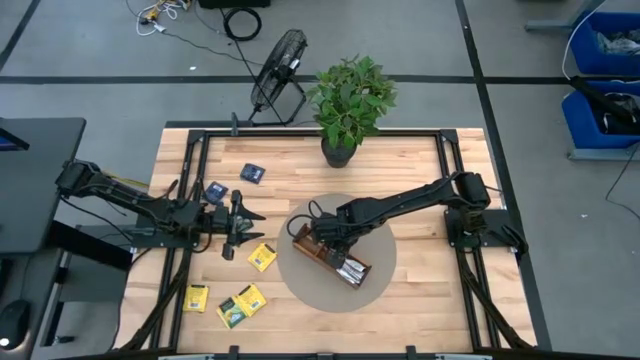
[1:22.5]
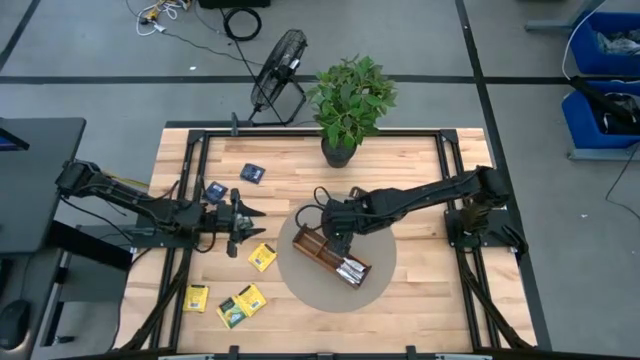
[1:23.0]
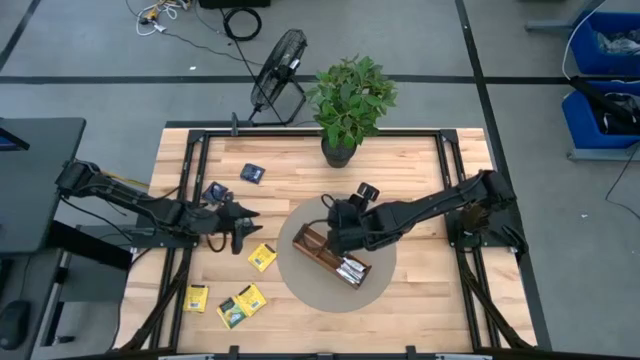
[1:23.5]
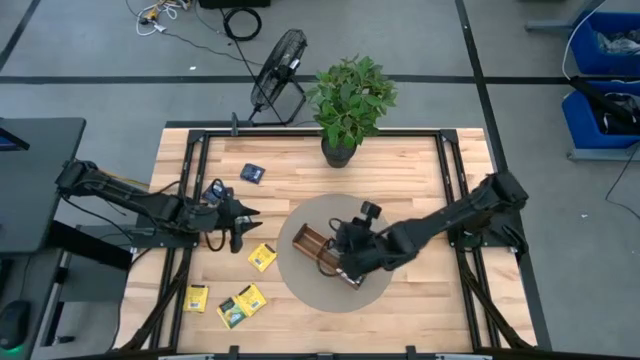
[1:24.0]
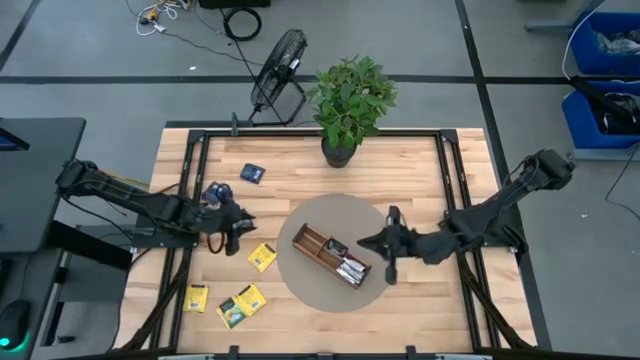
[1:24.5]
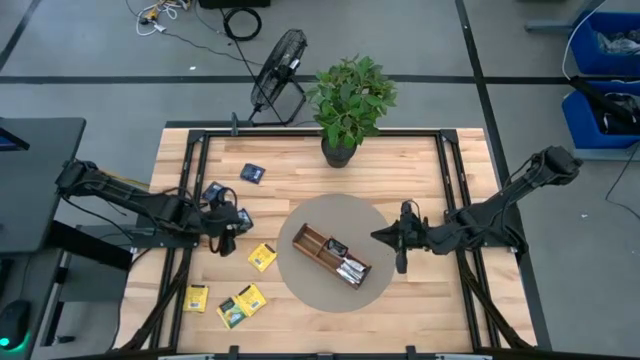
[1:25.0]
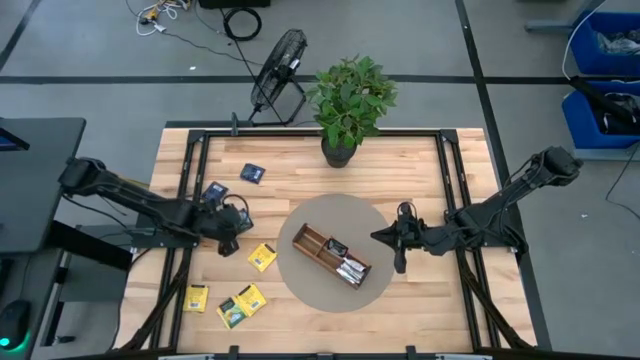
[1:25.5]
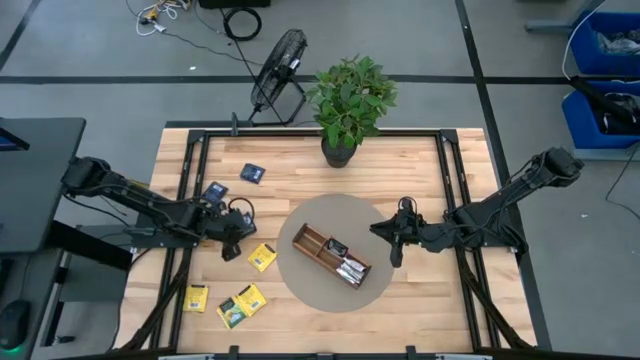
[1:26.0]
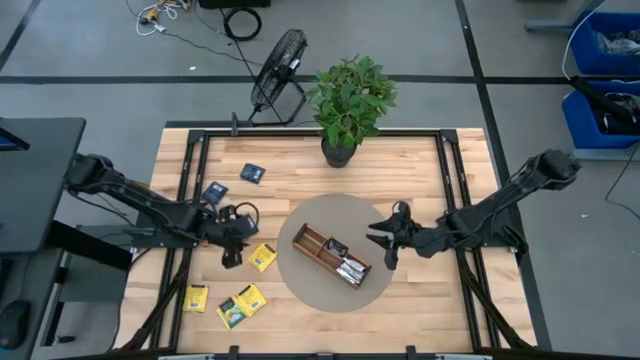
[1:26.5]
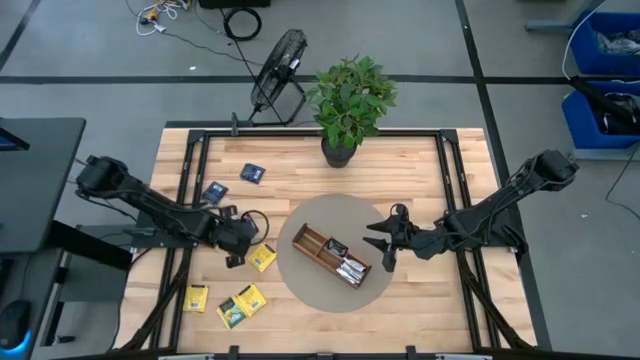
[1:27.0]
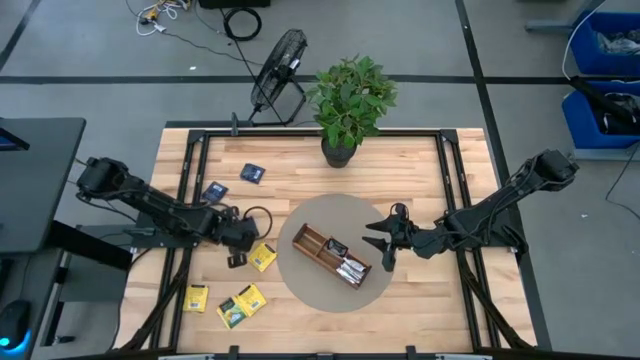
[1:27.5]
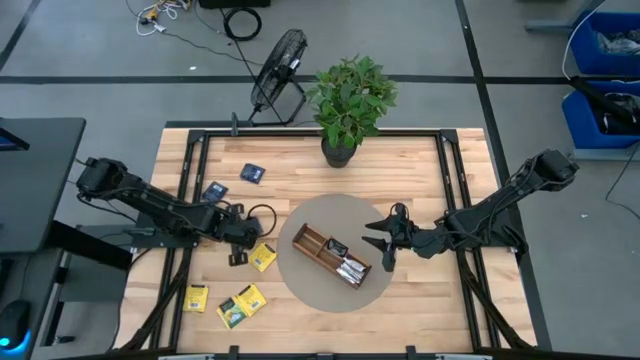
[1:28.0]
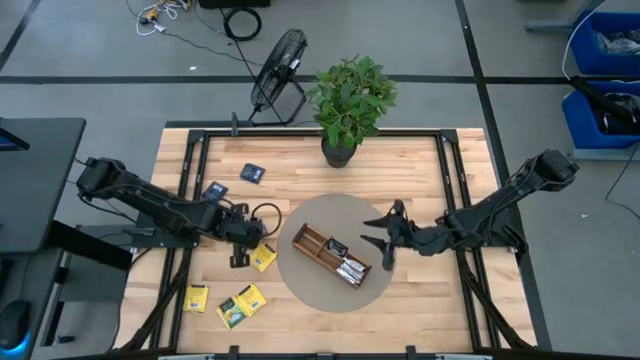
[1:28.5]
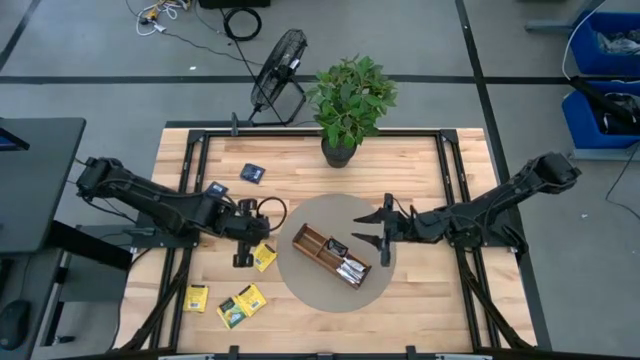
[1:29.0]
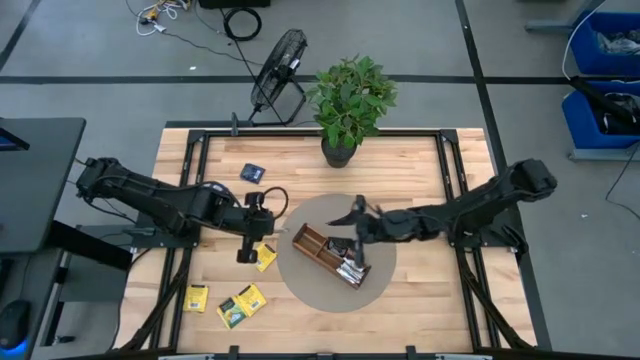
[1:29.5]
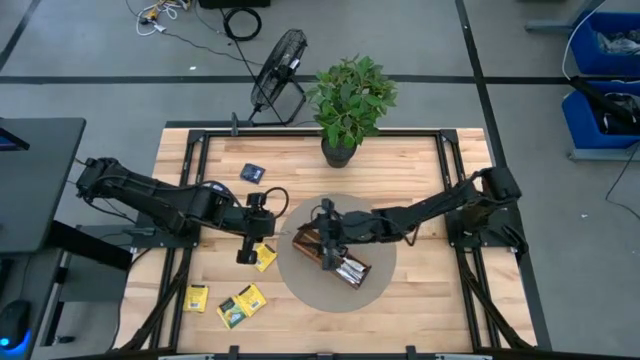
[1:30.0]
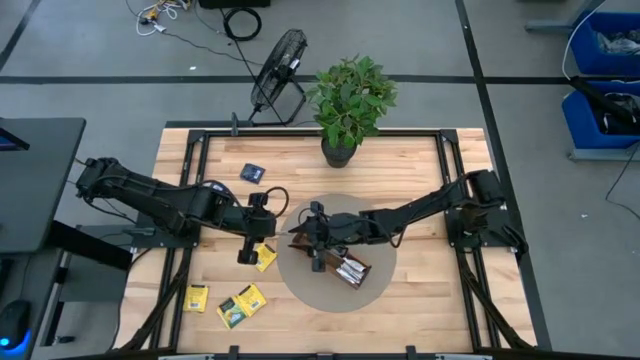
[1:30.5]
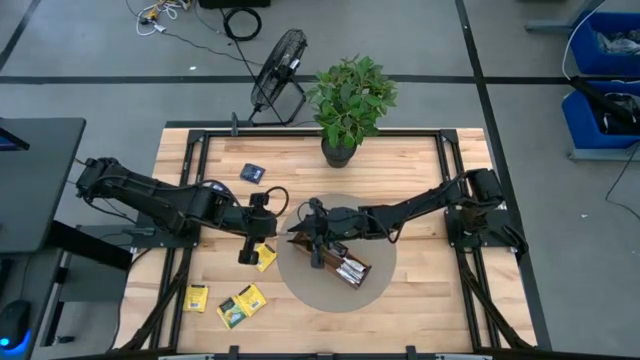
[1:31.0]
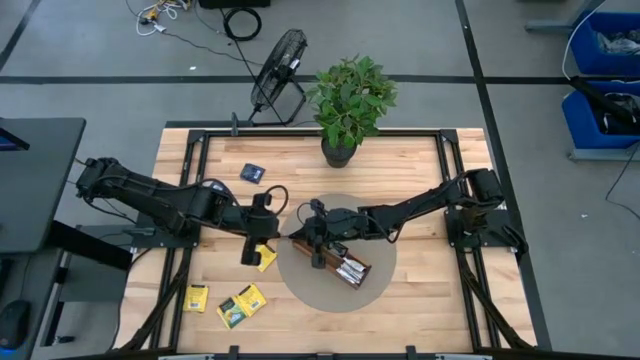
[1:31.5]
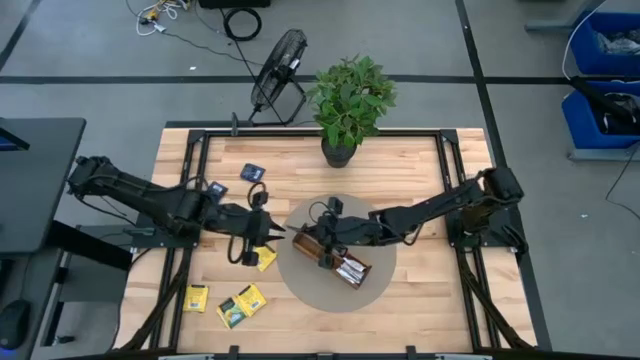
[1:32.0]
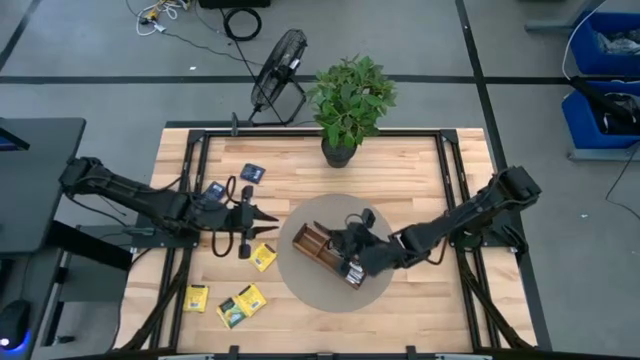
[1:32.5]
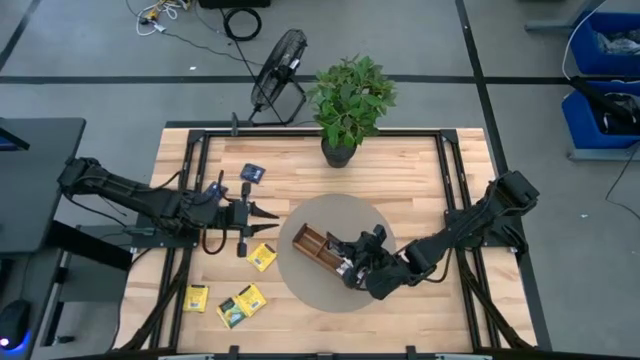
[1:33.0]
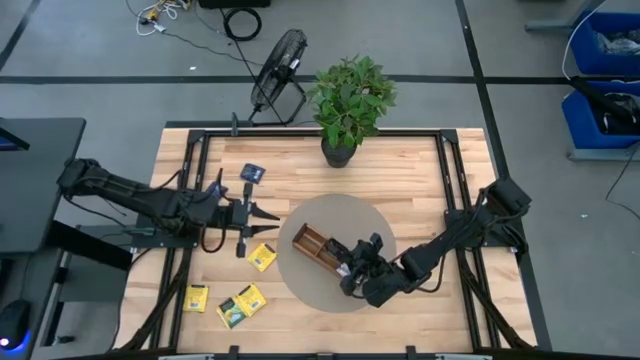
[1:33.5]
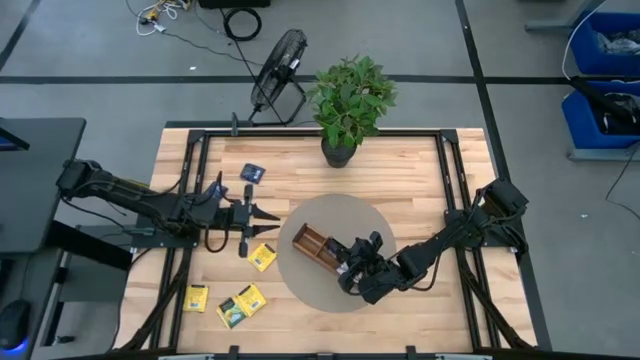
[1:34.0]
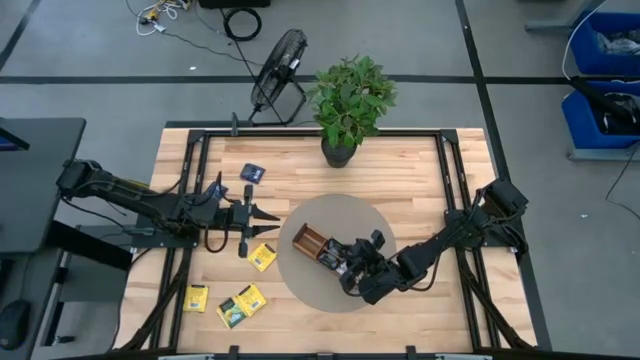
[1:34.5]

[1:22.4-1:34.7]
Task: Pick & Place Tea
Put the purple tea bag into the middle section of the wooden organizer

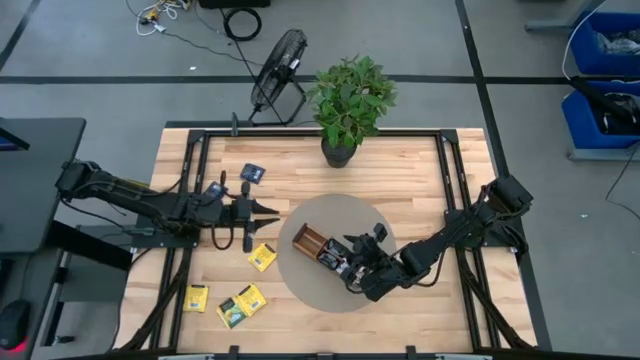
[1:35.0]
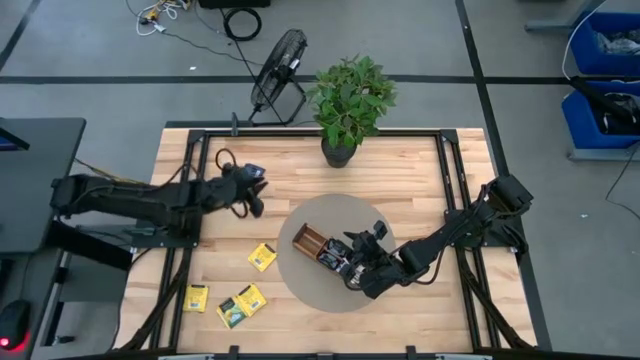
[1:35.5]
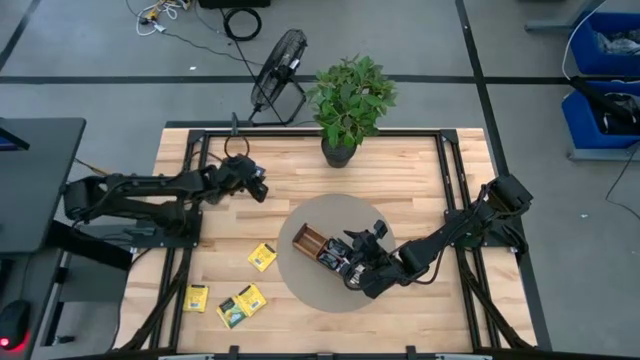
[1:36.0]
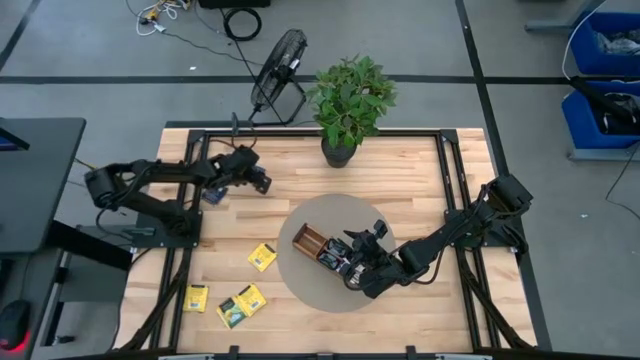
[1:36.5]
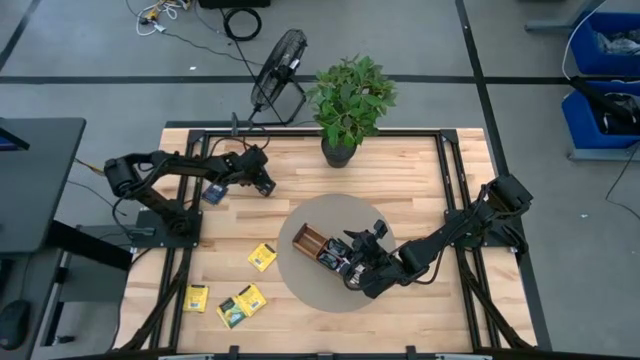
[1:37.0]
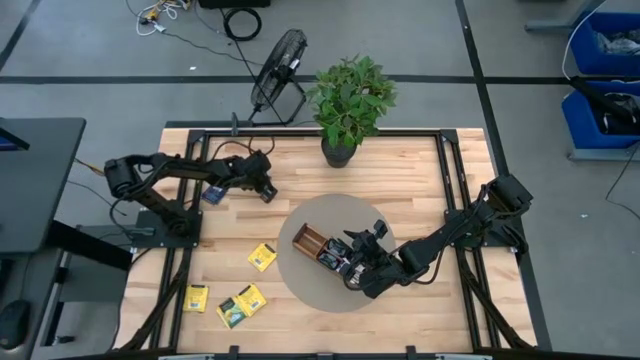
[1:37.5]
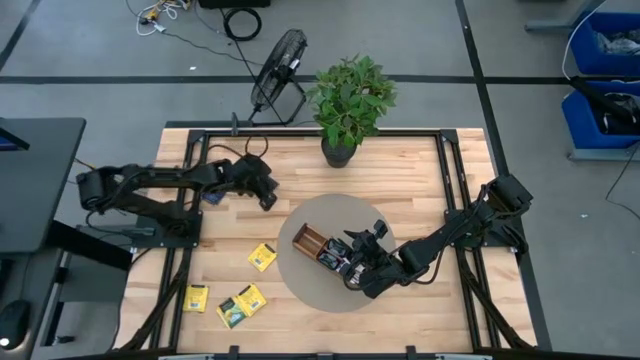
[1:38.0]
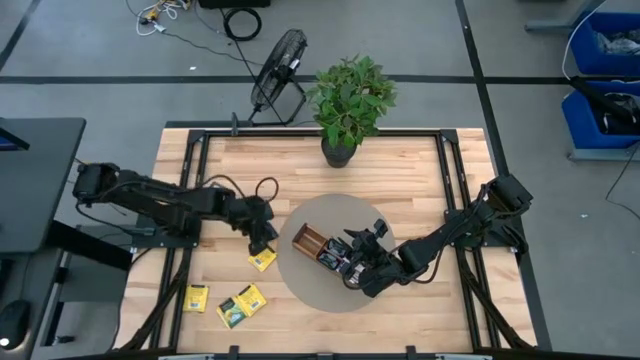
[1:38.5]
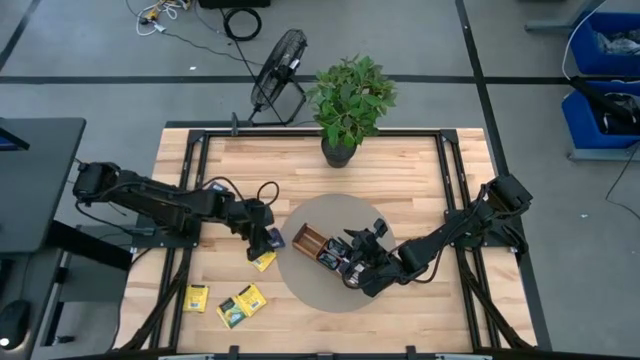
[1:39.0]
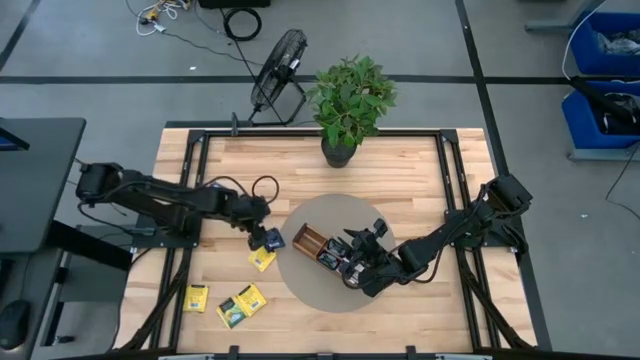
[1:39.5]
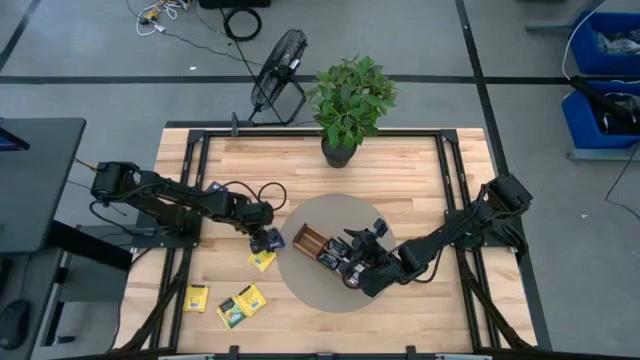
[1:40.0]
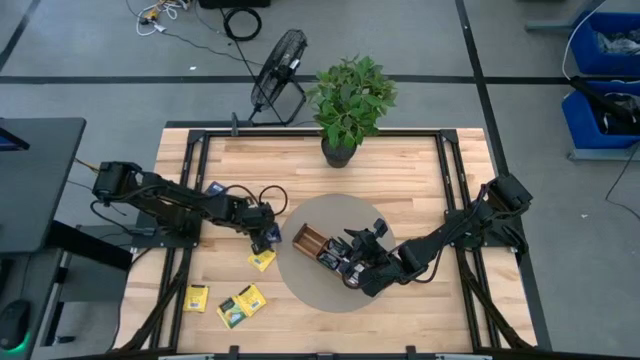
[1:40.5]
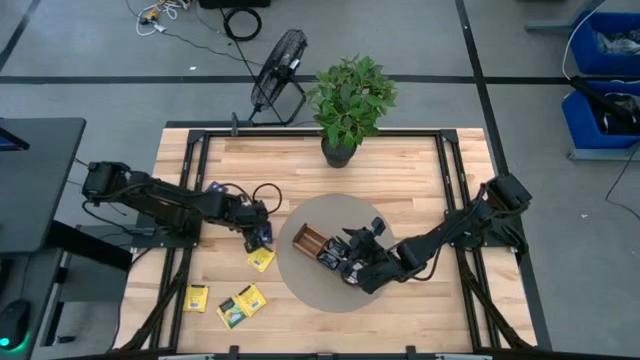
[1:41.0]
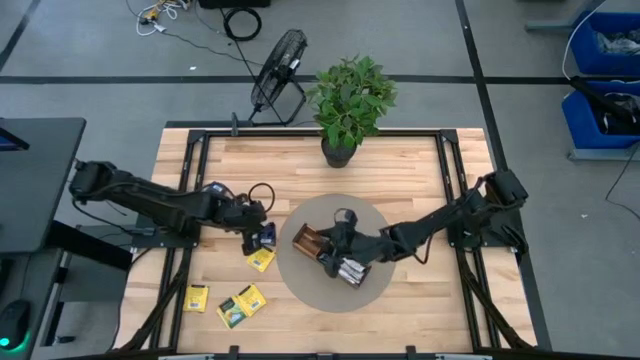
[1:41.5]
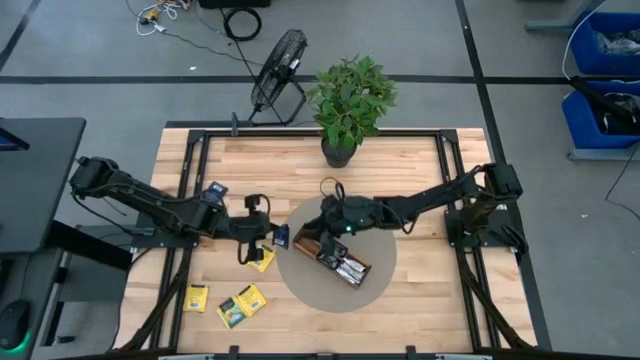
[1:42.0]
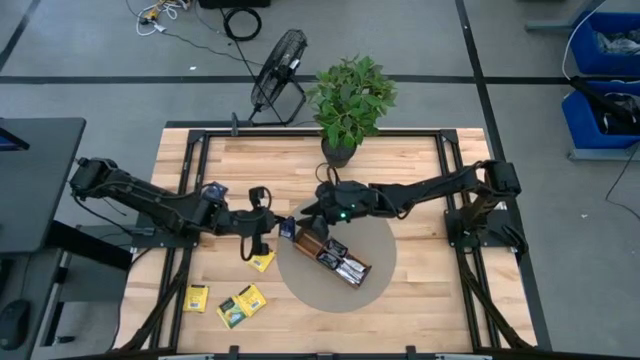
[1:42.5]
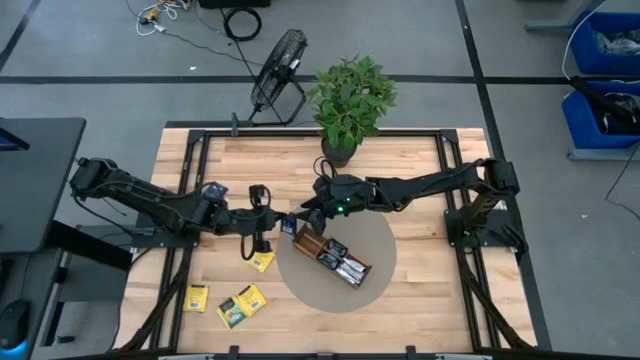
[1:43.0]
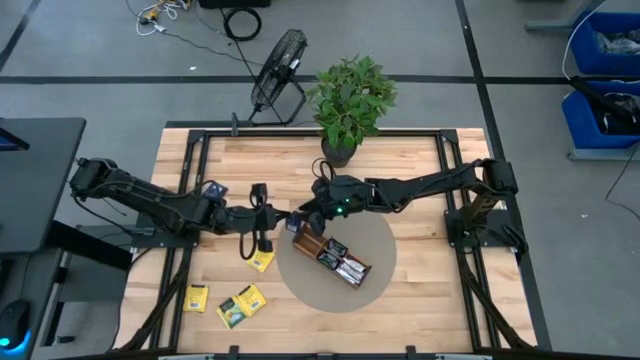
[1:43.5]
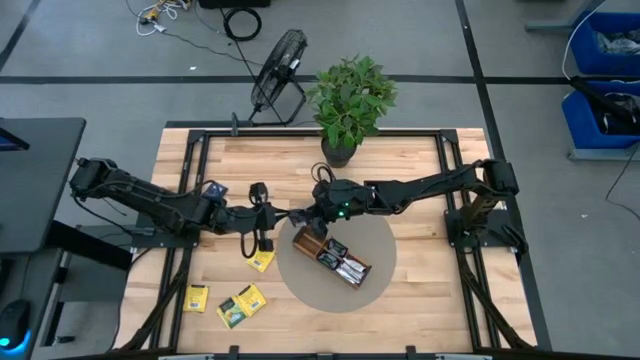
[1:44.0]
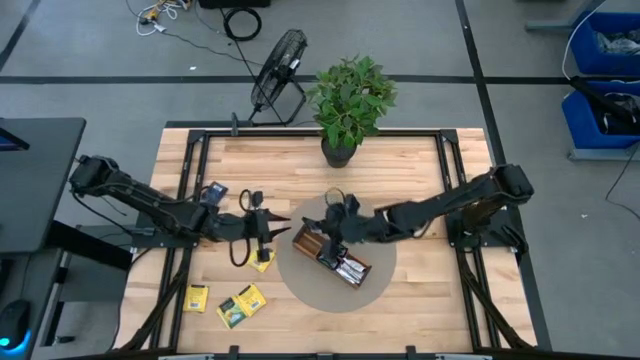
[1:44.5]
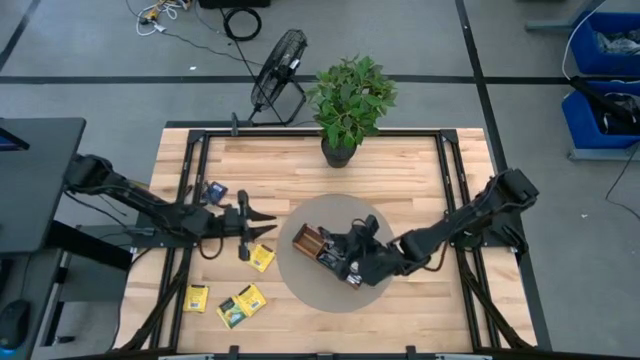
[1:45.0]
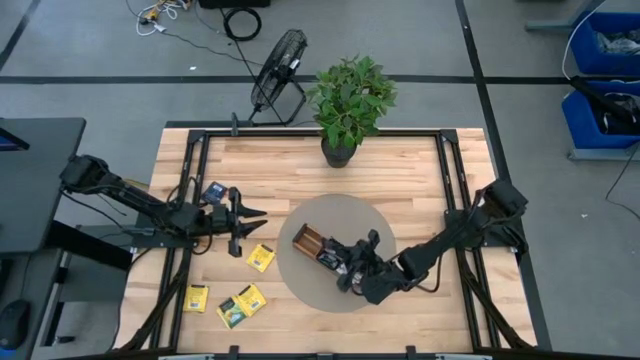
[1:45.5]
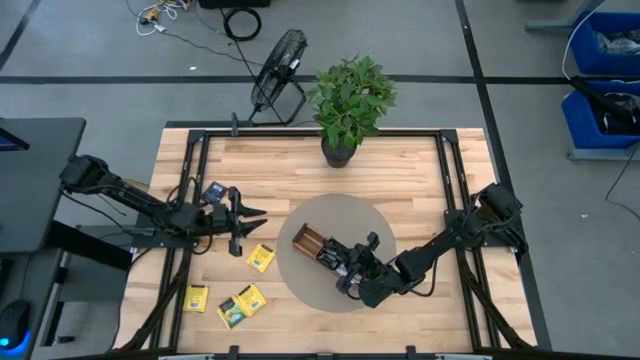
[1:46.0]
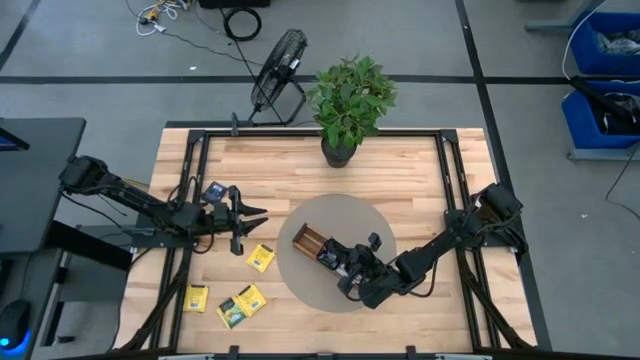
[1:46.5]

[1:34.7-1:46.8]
Put the purple tea bag into the middle section of the wooden organizer
